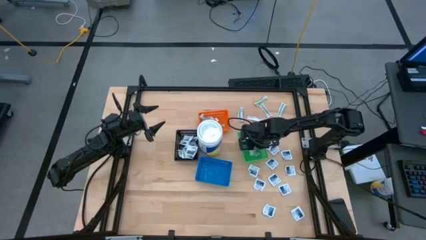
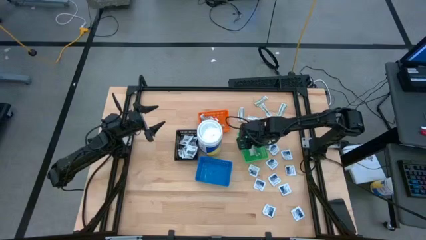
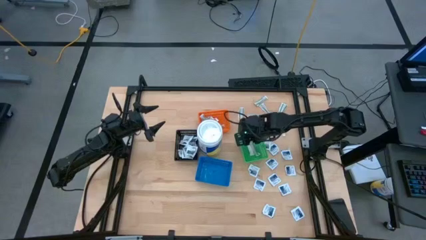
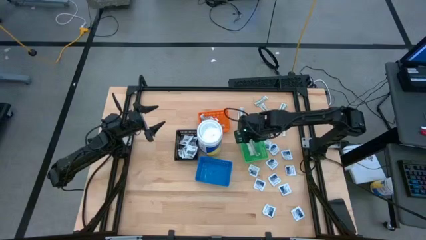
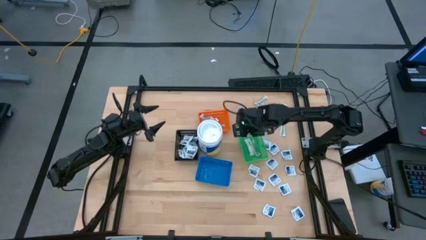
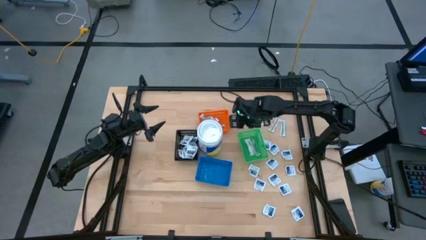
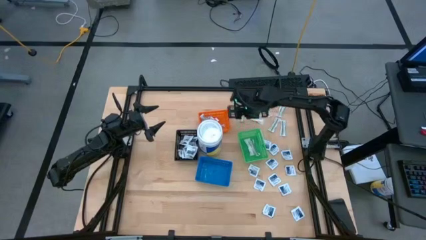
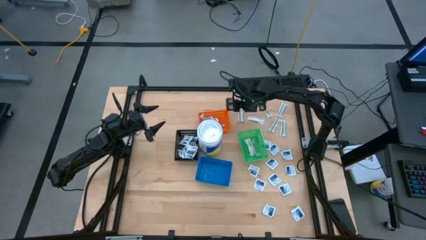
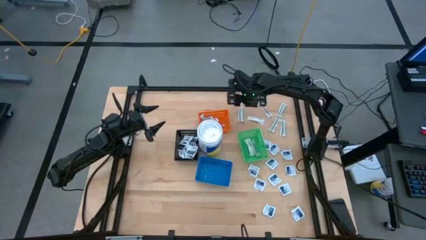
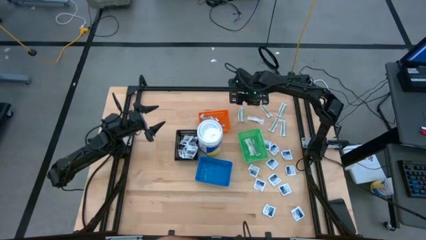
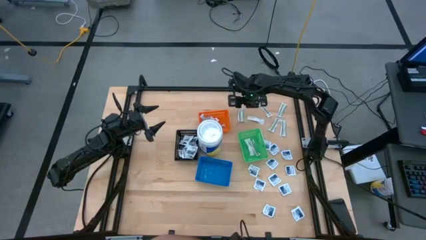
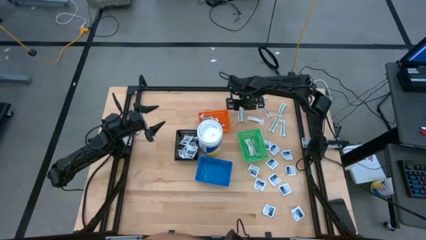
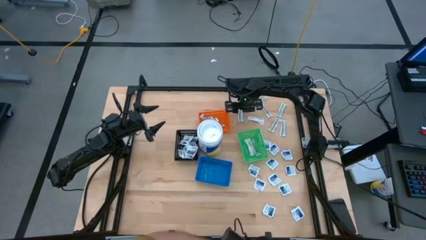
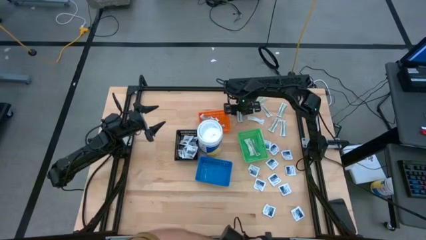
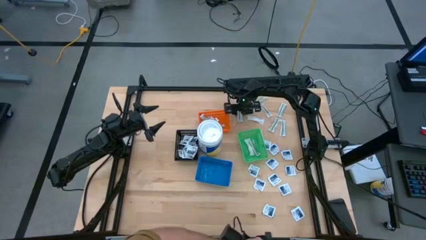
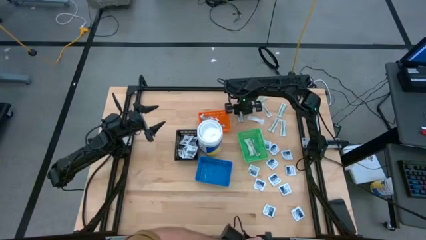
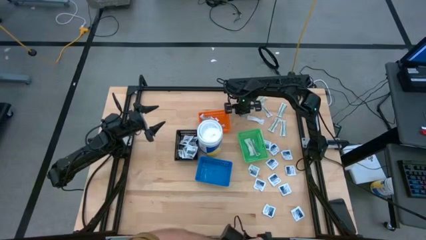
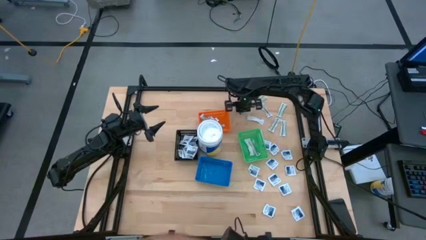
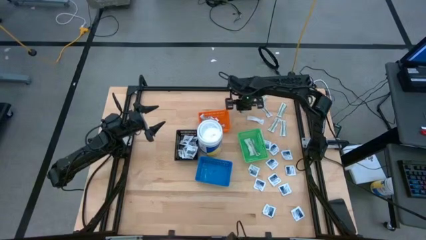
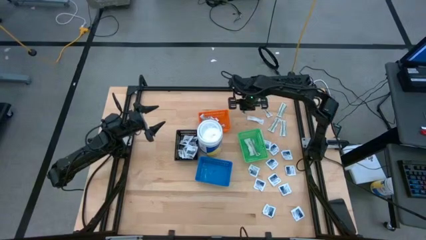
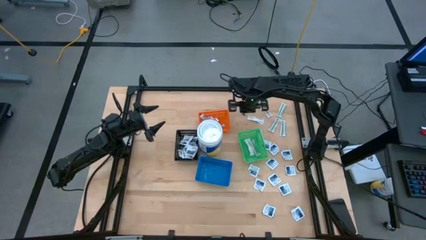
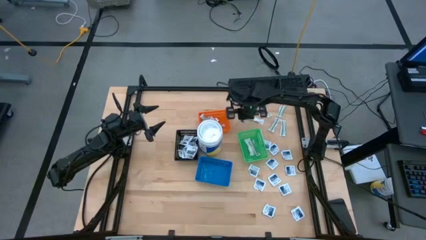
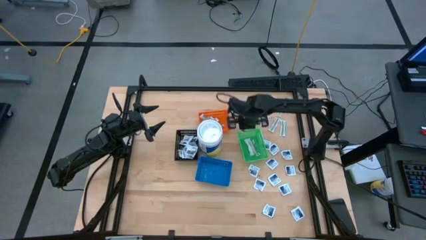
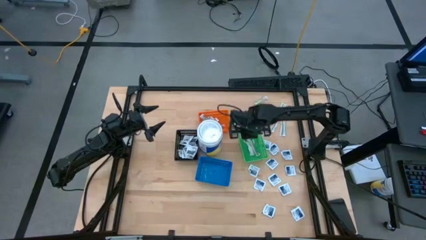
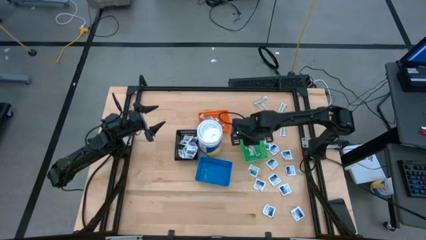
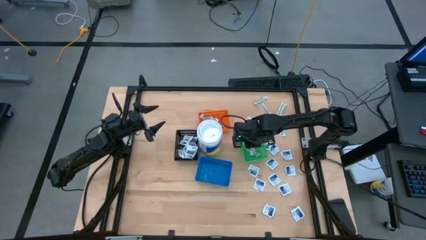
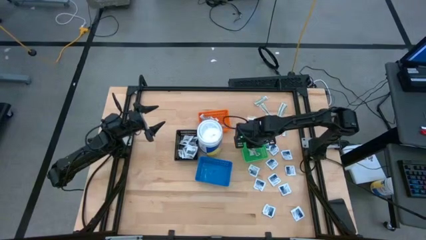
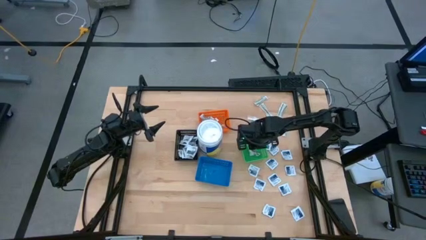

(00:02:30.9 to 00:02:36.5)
Task: Pick & Place First Aid Supplies
Put the green bandage pack into the green bin

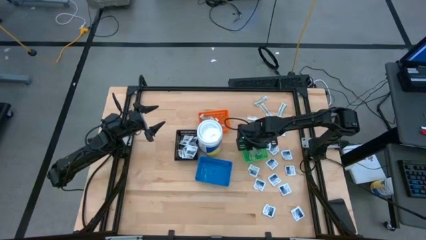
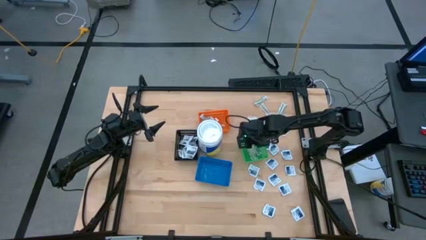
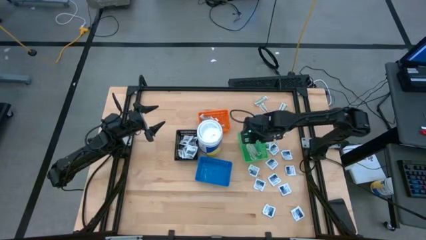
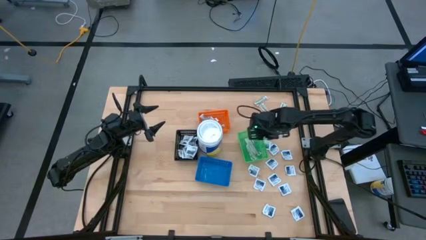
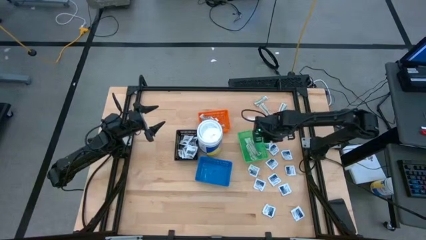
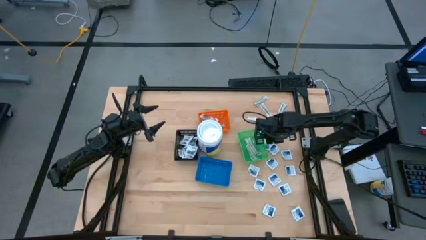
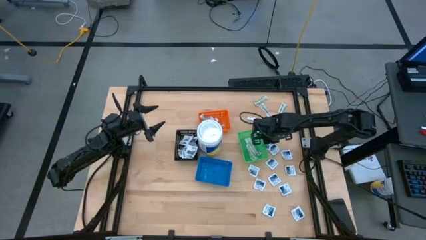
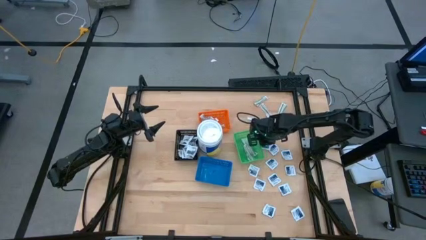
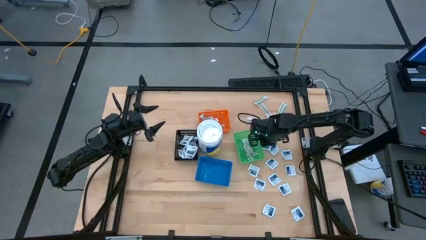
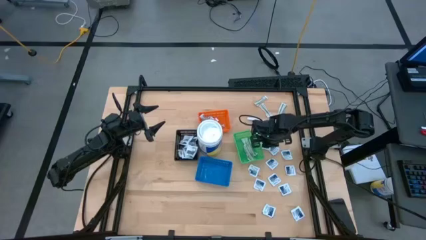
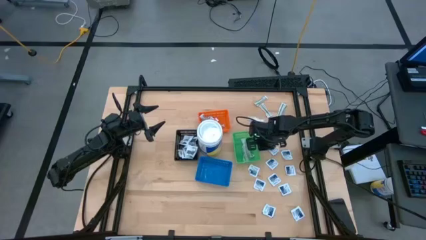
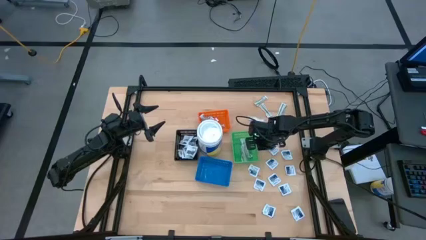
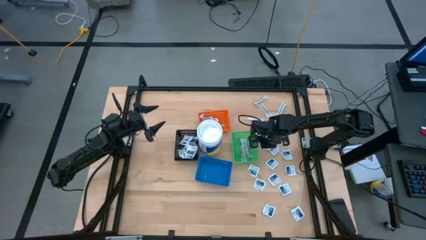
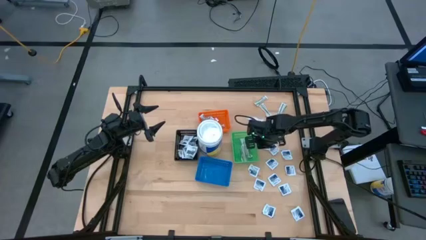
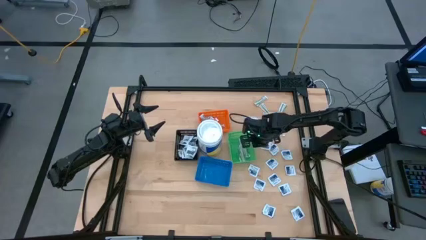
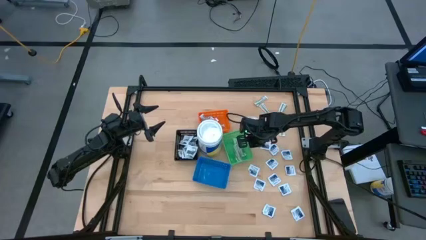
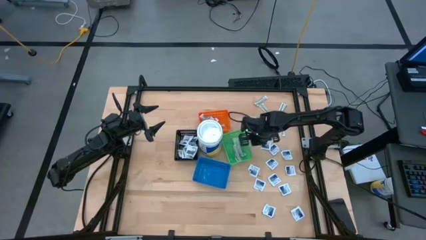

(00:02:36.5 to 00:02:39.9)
Adjust the green bin on the table

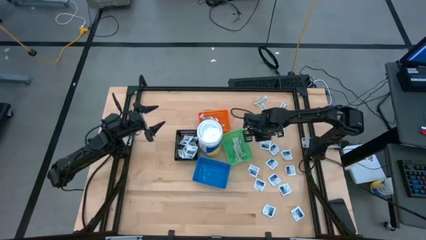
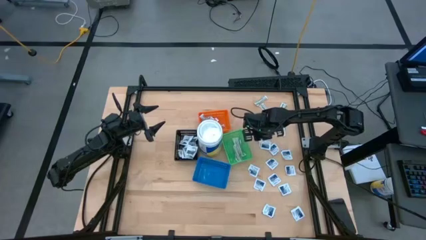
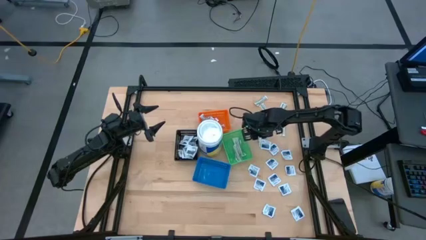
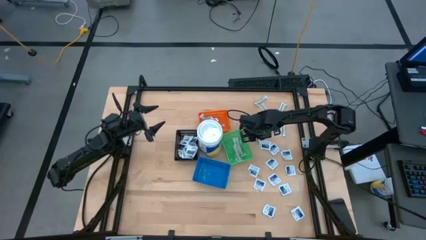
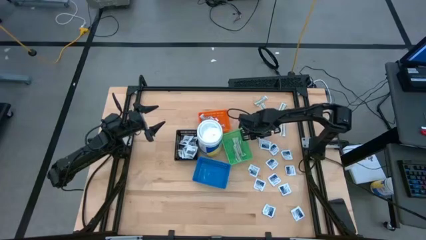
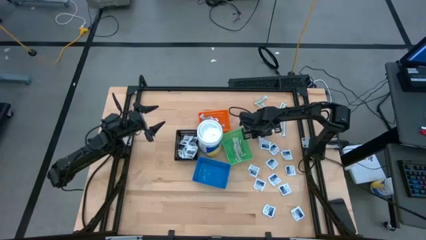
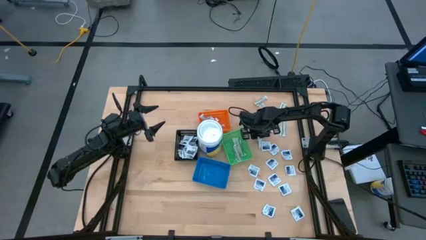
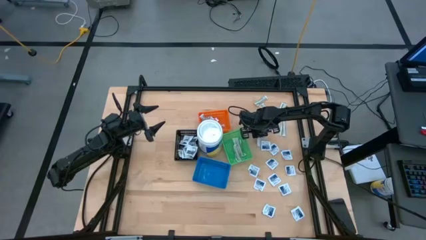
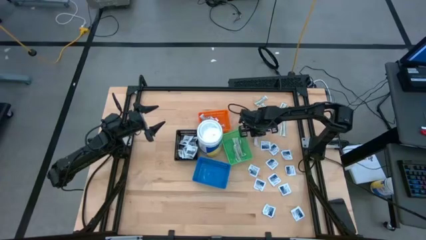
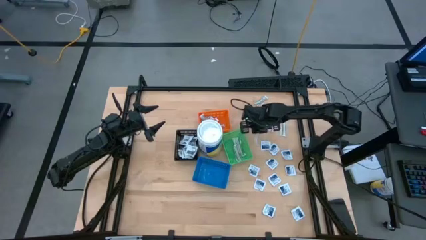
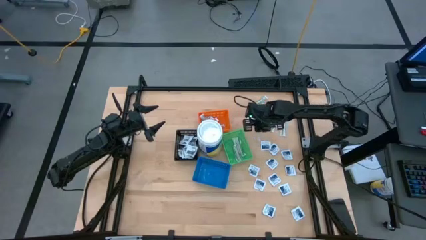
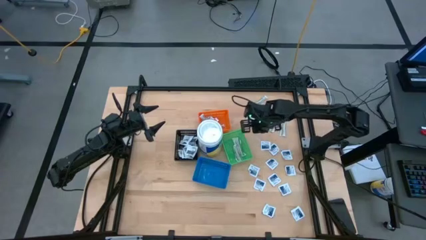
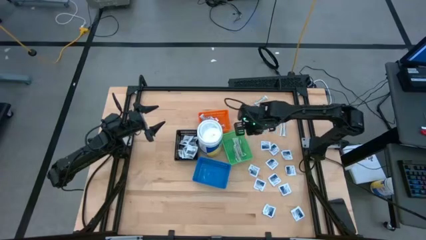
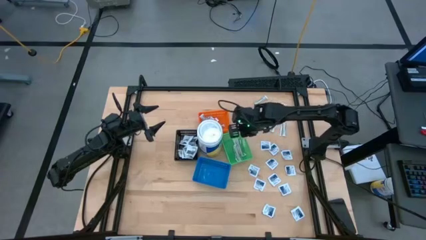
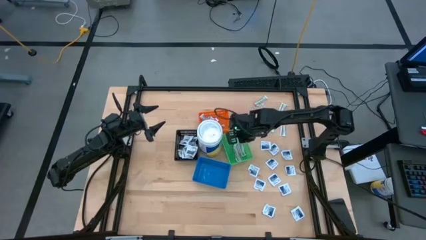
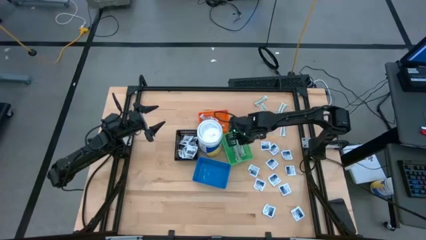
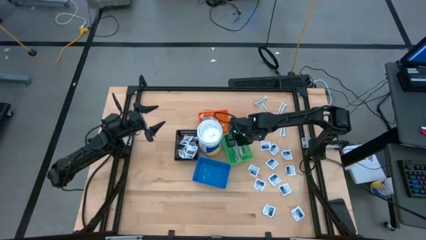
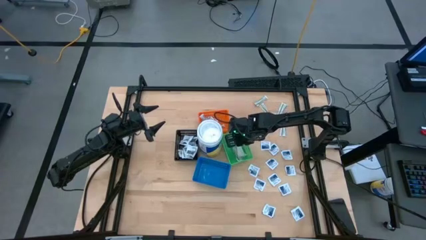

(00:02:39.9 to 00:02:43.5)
Put the green bandage pack into the green bin

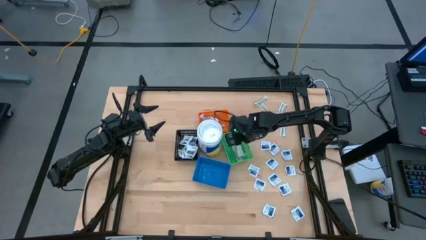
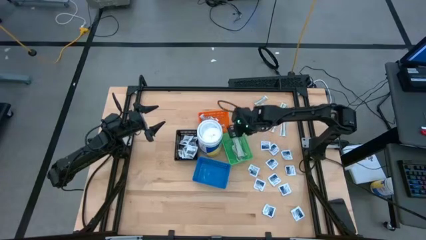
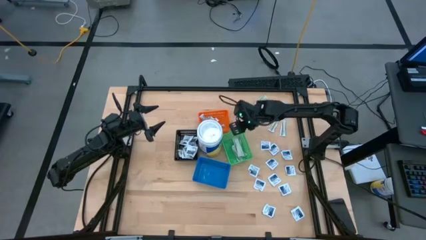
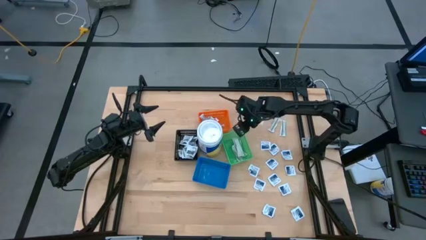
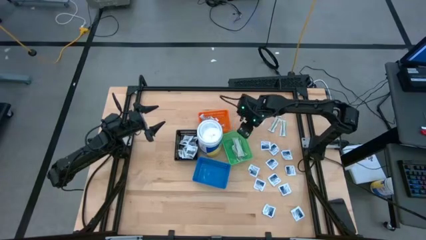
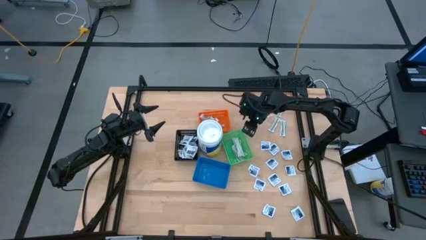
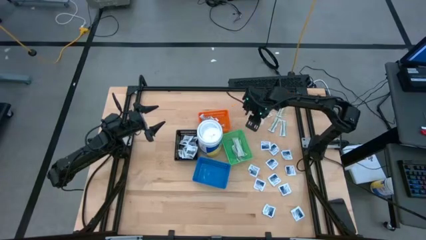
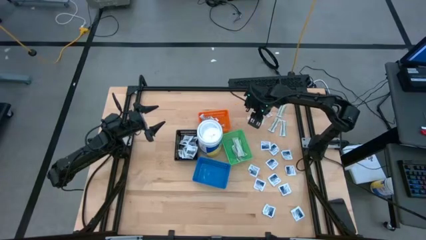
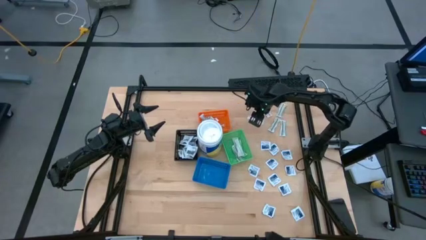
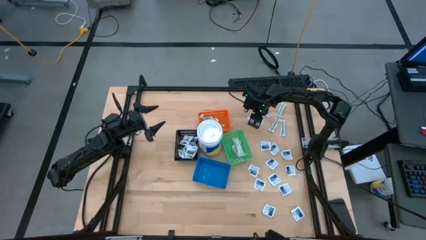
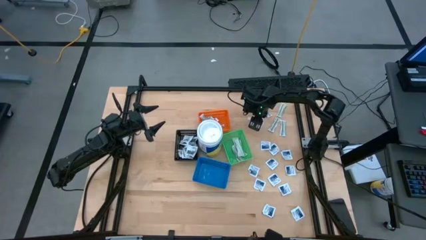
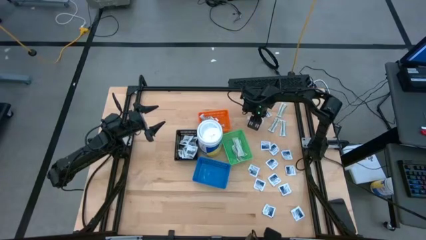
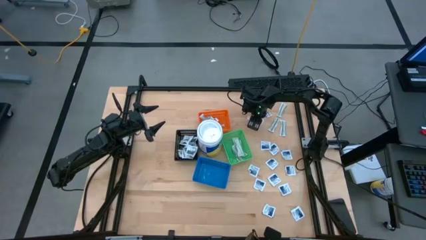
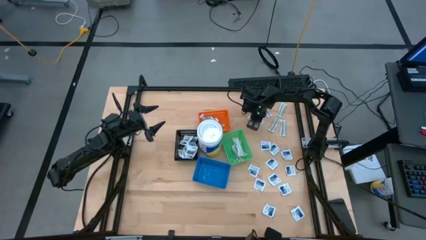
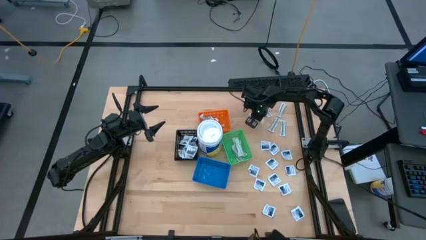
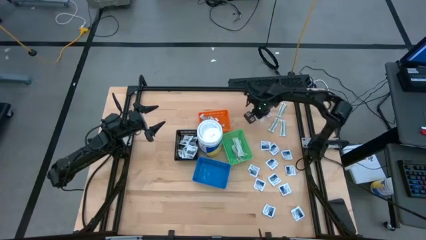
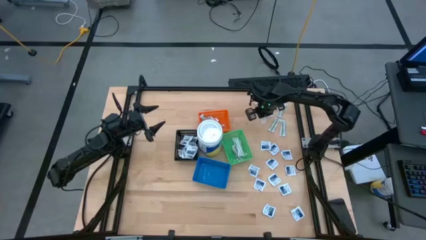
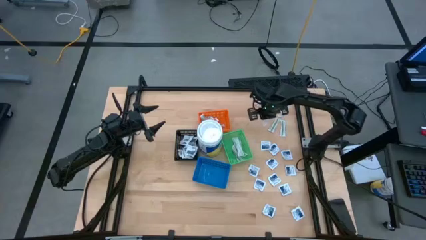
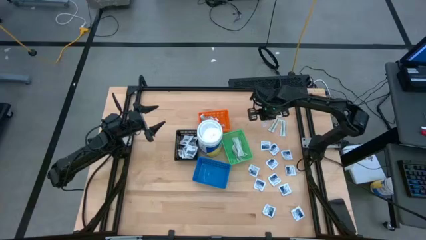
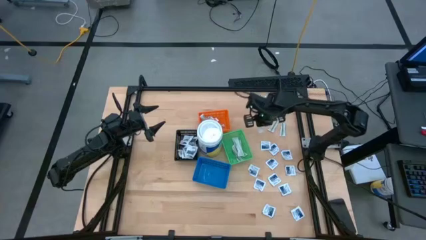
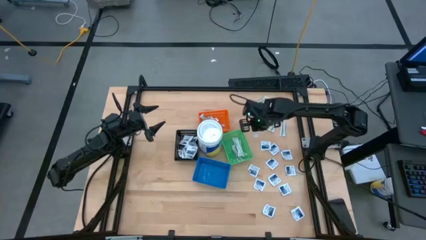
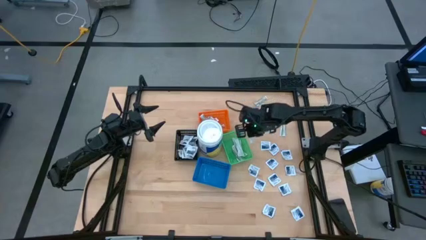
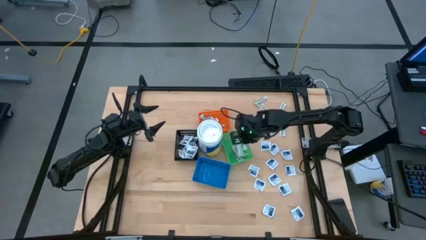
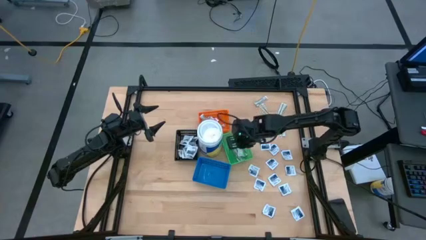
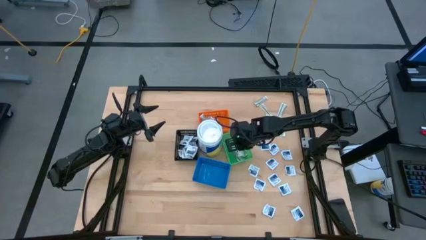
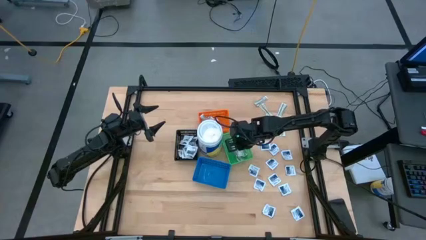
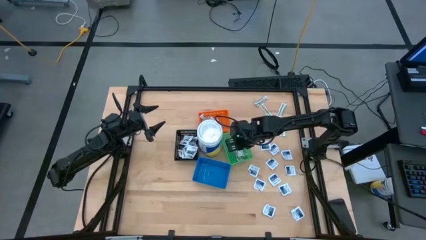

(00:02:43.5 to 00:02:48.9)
Put the green bandage pack into the green bin
